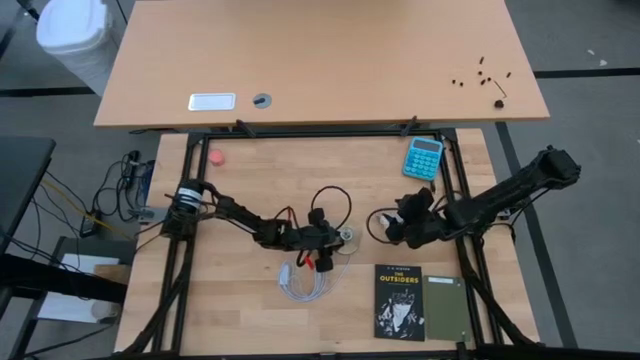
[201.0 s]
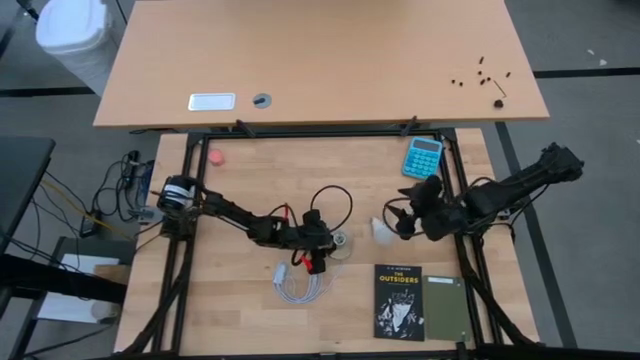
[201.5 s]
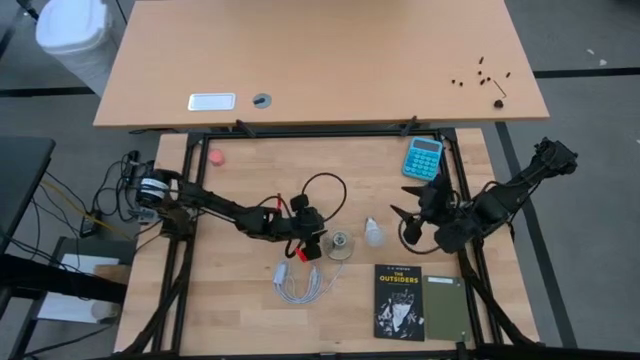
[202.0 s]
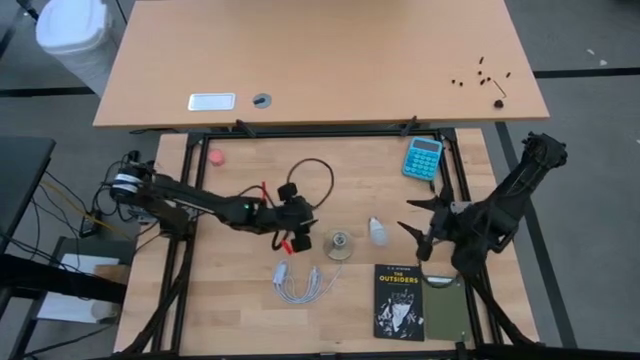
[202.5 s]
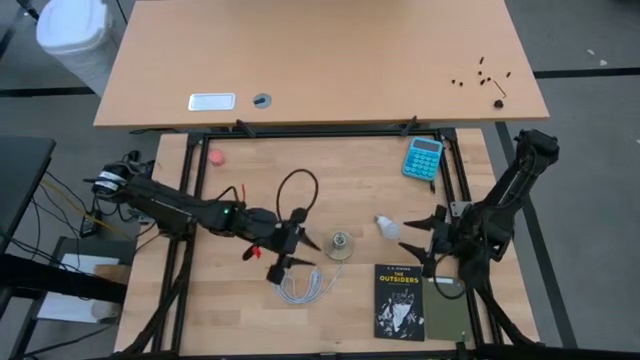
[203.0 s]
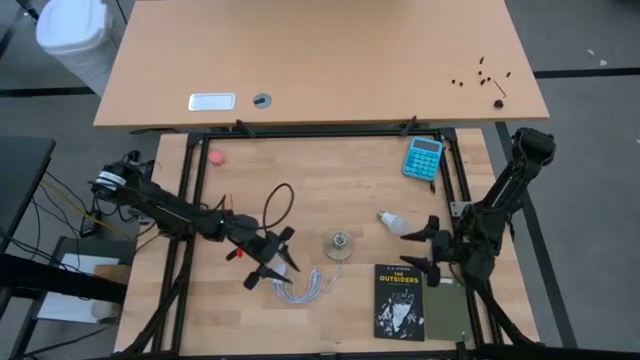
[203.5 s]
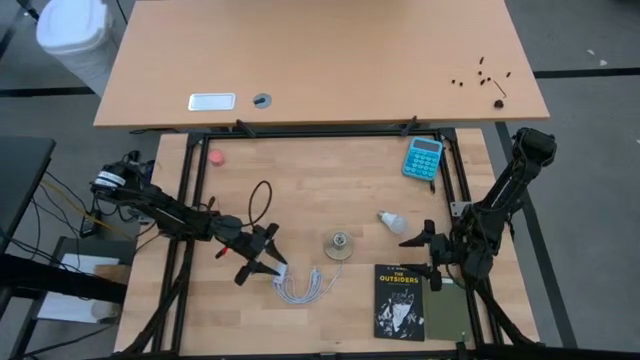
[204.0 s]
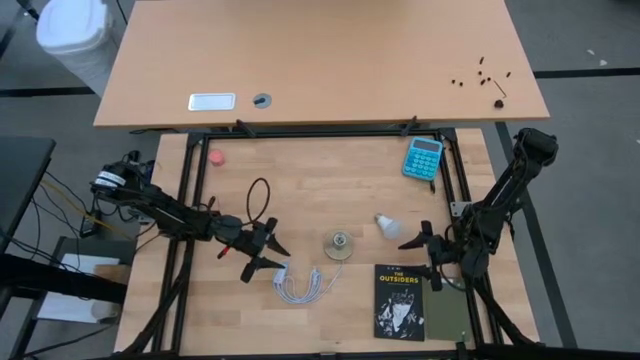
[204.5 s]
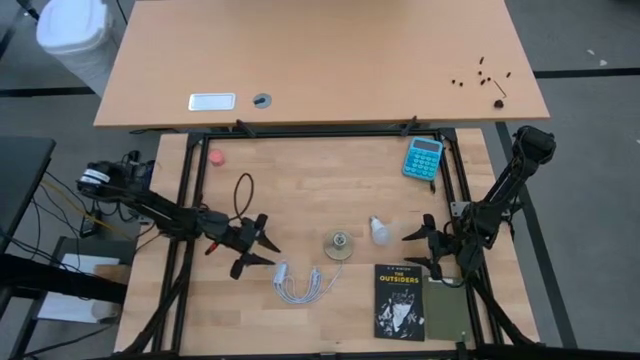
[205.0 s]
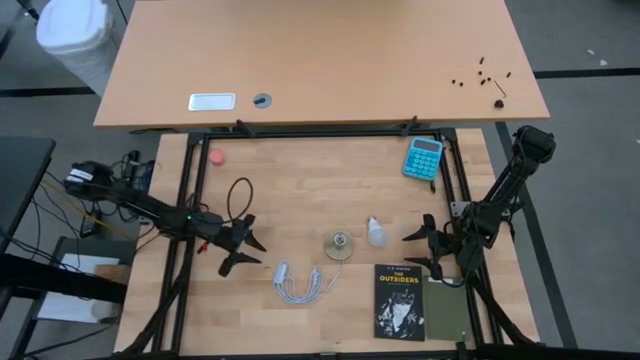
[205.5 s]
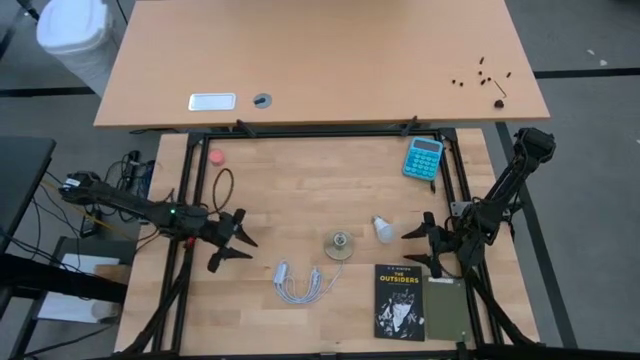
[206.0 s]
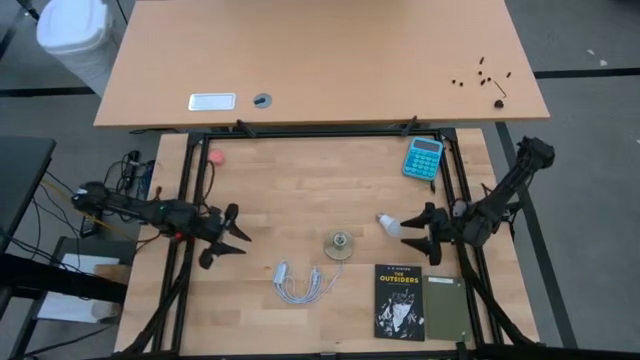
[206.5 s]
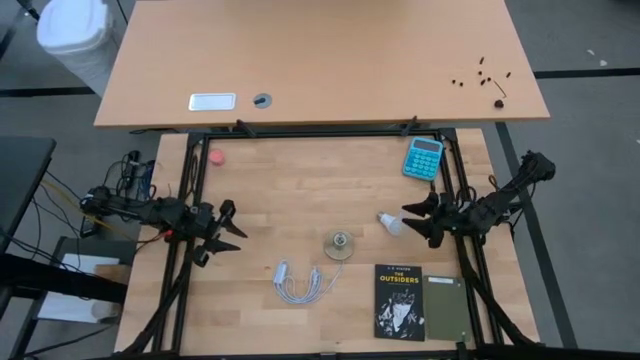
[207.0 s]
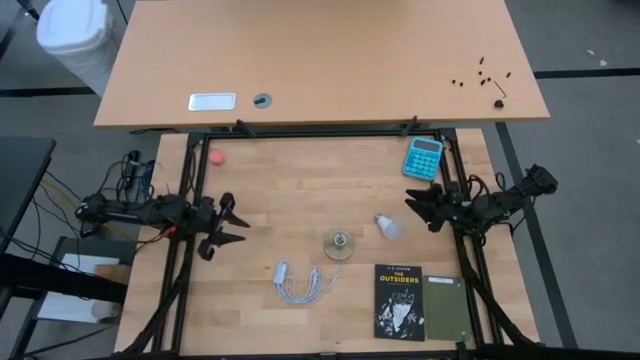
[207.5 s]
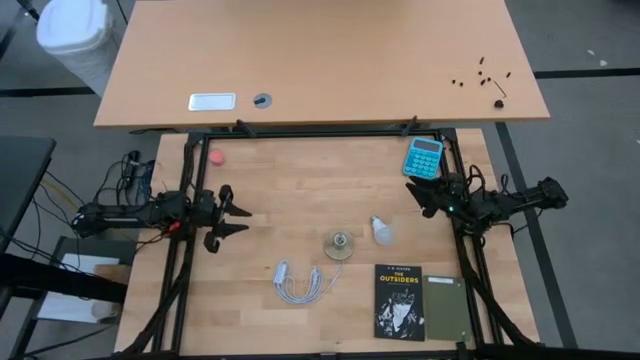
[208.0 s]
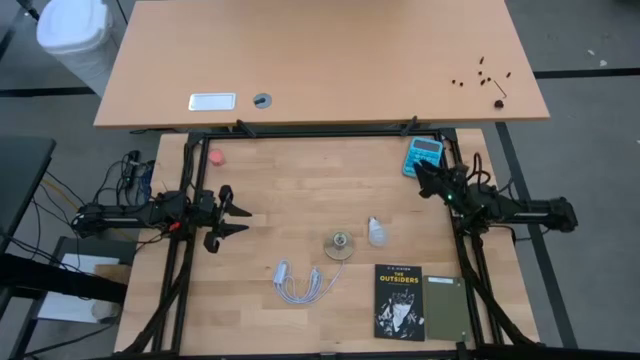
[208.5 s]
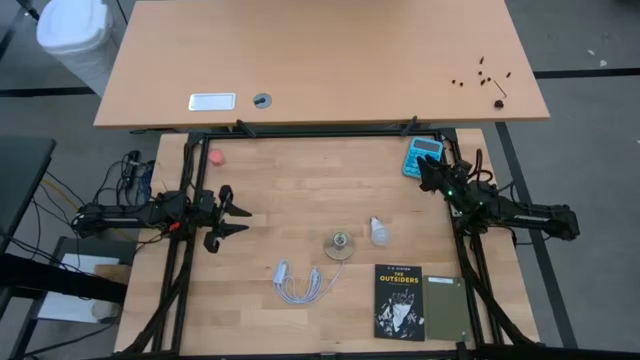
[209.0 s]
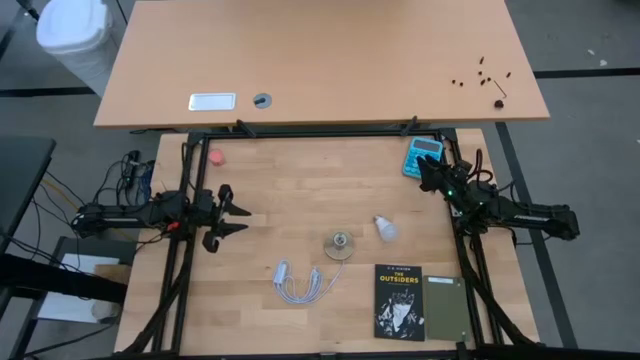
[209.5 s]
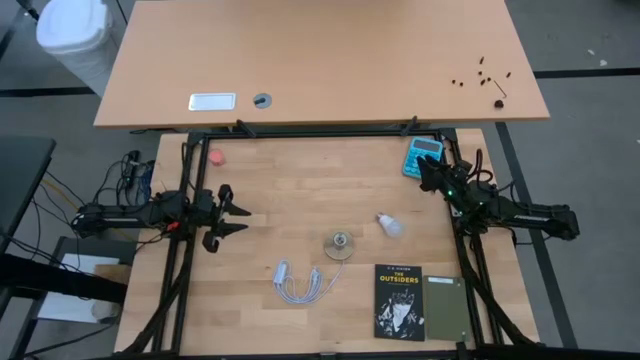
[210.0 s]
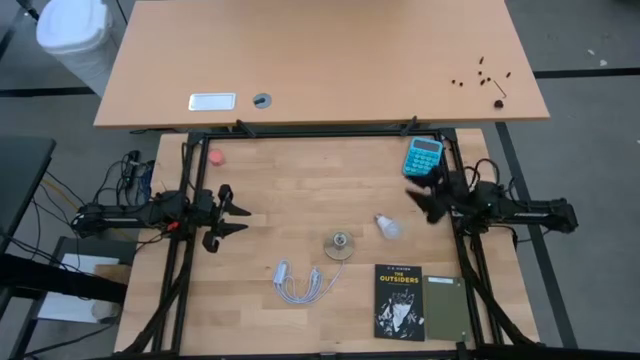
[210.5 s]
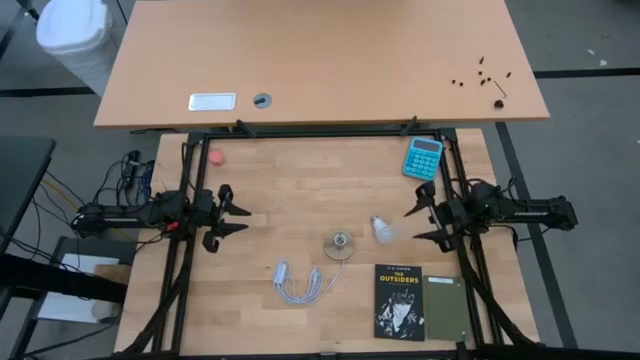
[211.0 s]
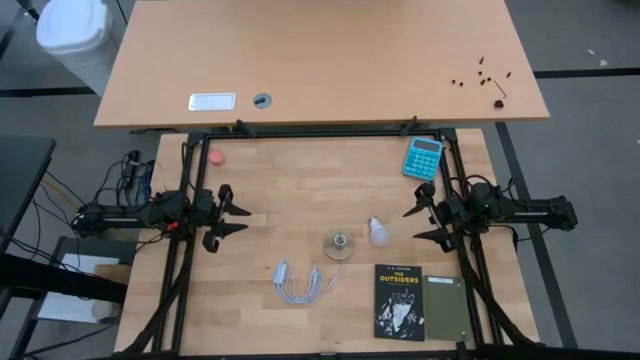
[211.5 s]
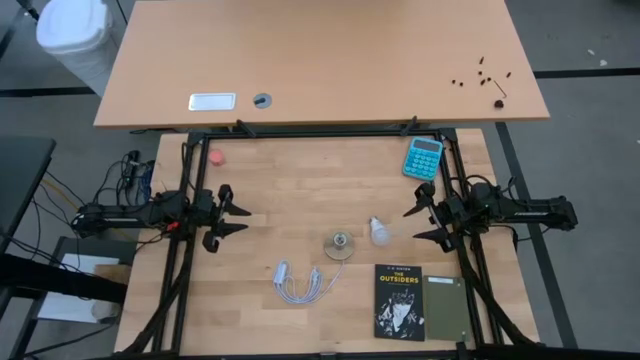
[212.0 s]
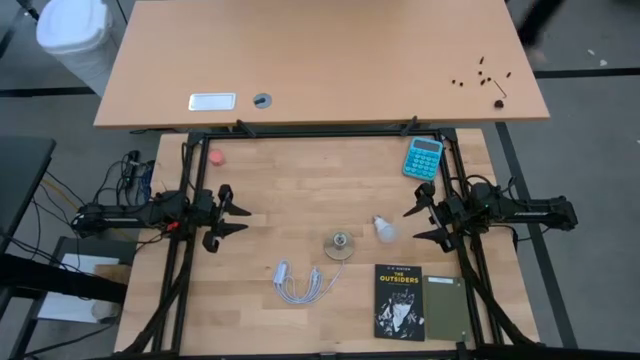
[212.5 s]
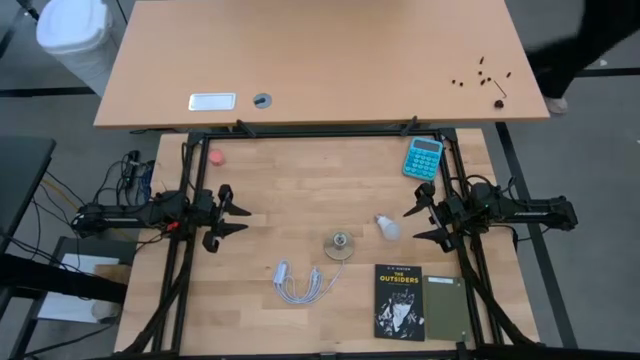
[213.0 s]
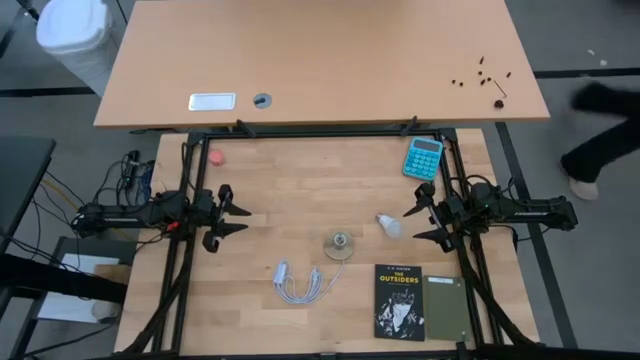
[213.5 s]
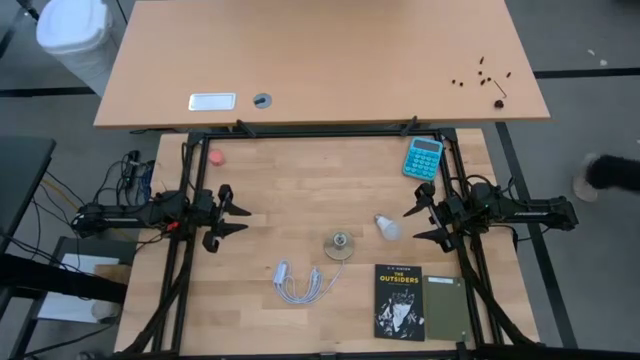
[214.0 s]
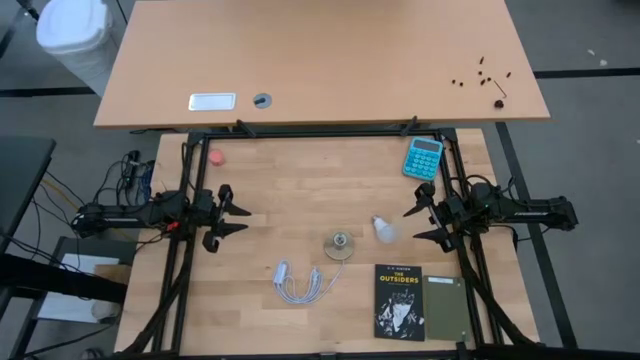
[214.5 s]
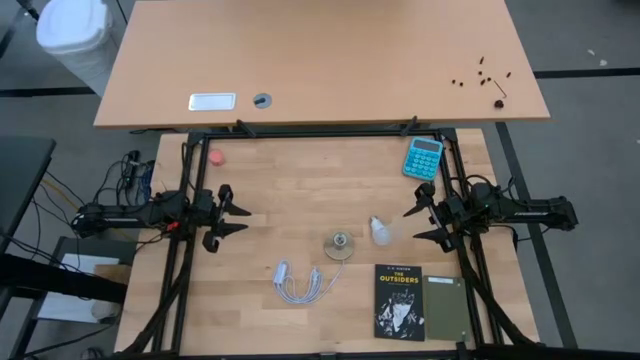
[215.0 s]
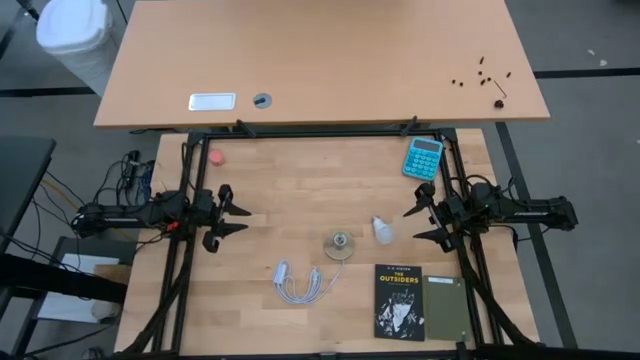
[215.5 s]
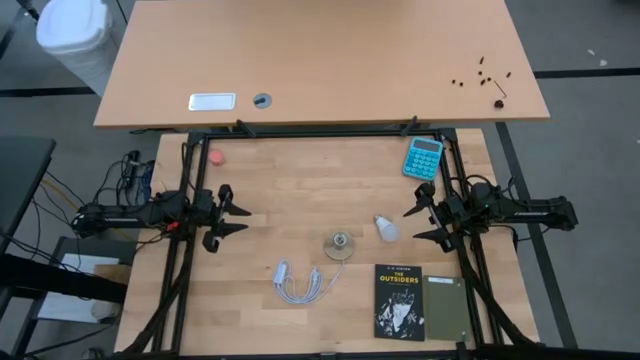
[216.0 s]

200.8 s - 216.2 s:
Task: Screw lightbulb
Return to Home Position

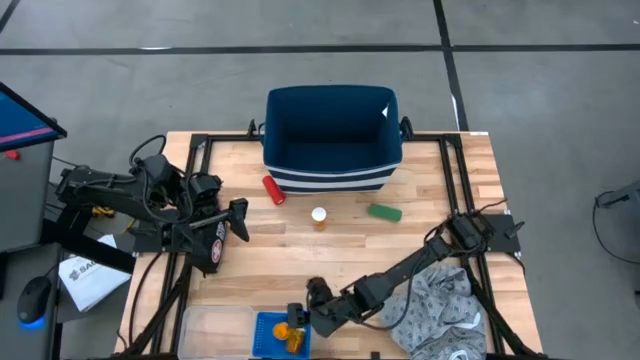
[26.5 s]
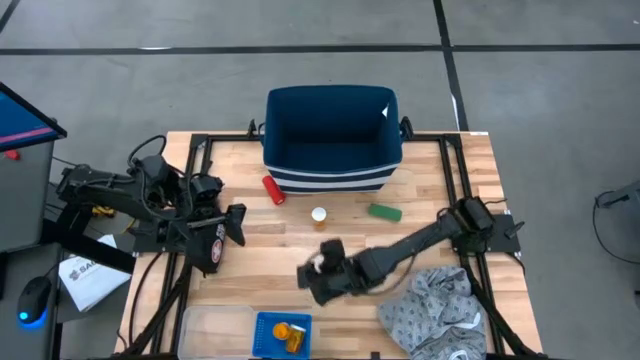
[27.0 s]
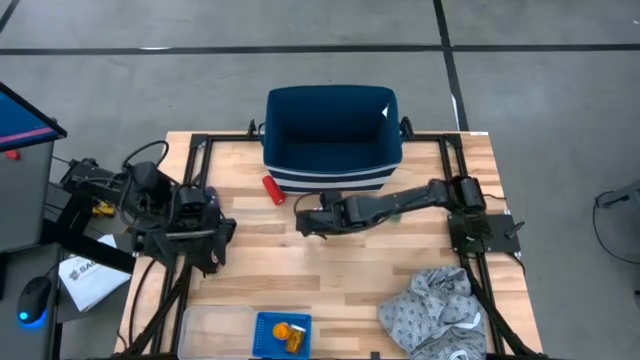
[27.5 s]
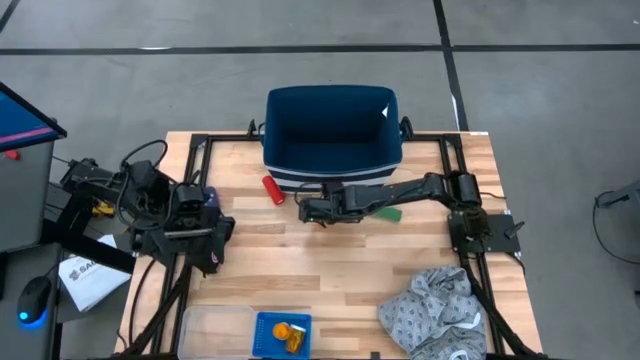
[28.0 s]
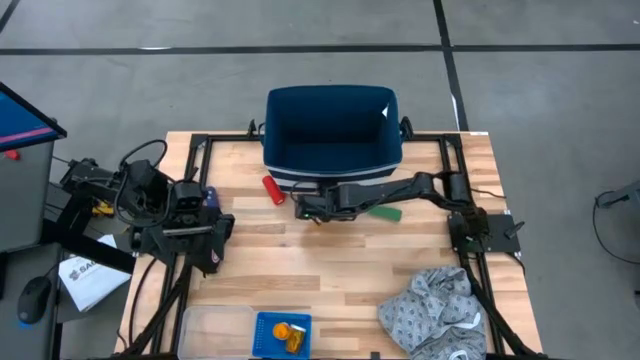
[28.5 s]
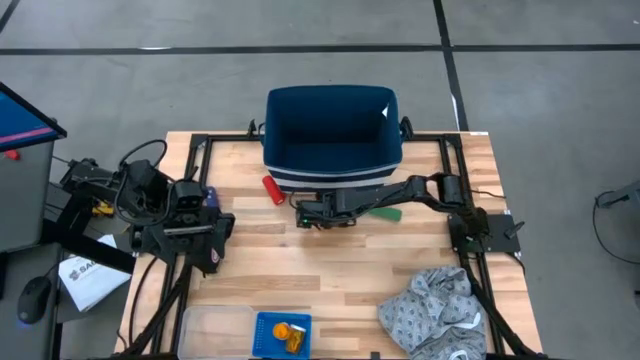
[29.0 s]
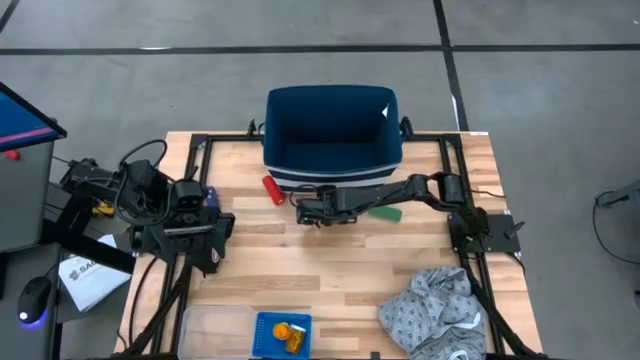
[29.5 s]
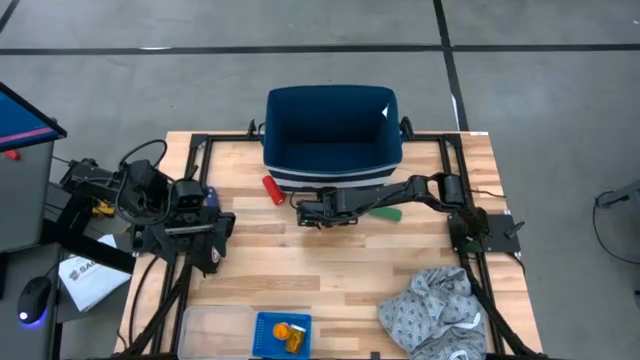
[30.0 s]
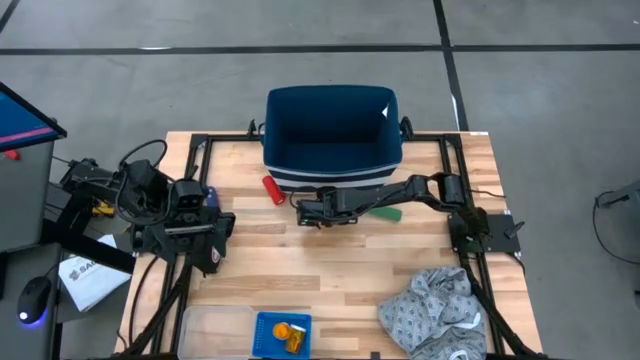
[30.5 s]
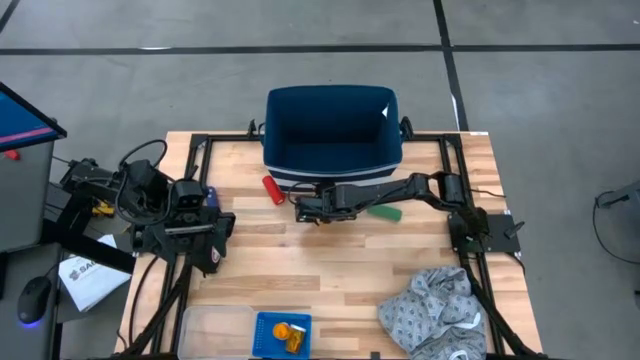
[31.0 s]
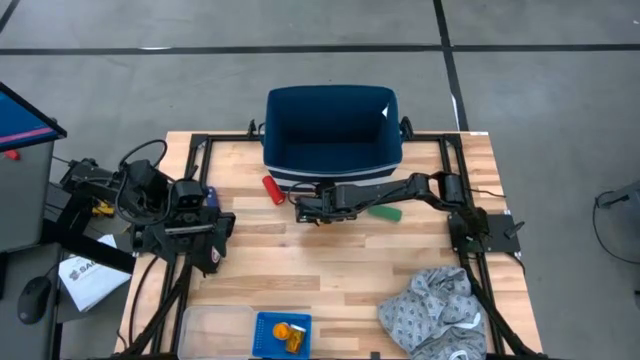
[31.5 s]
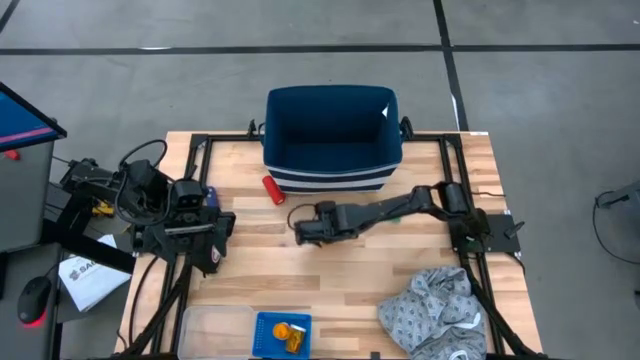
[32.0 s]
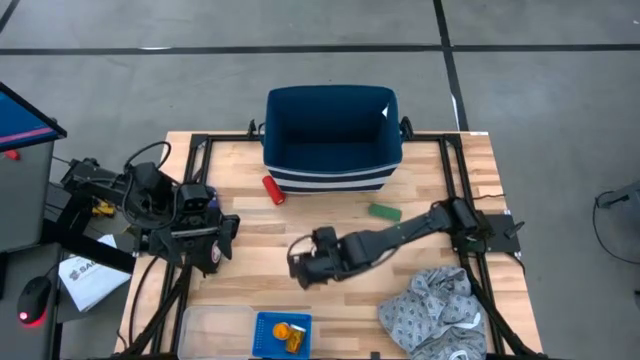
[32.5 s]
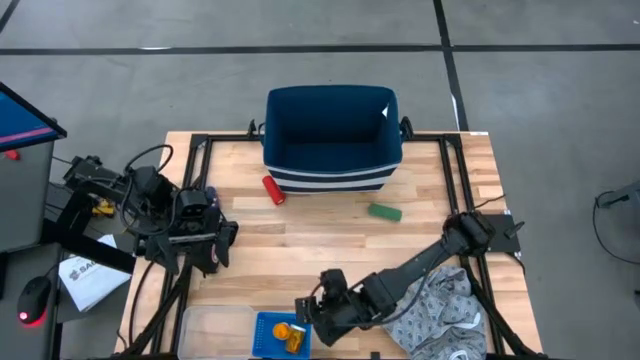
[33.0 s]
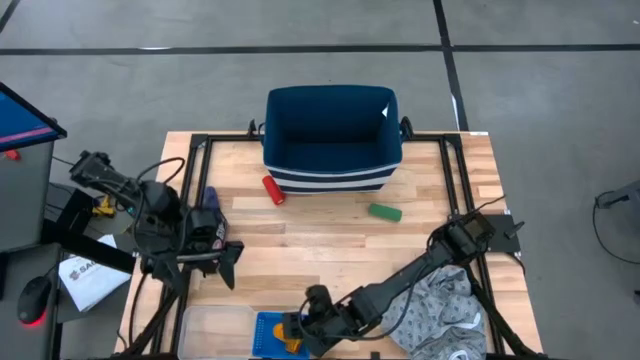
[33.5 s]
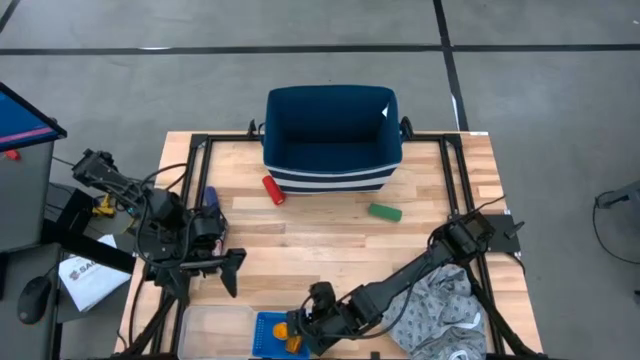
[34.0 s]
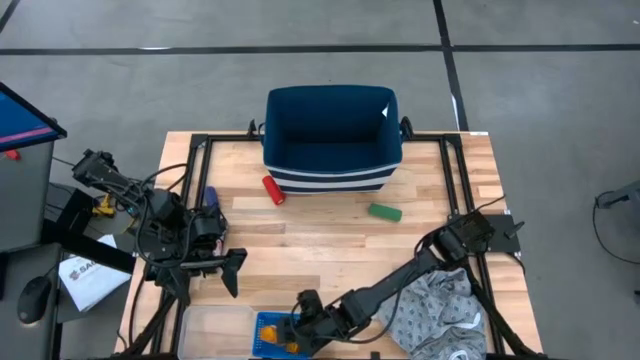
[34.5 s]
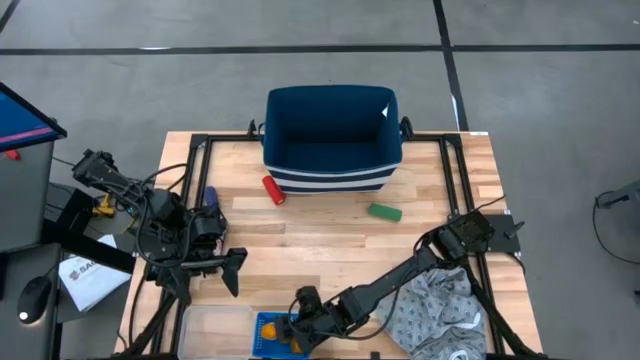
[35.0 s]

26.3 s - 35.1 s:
Task: Pick & place medical supplies in basket/bin
Put the yellow pill bottle in the blue basket
